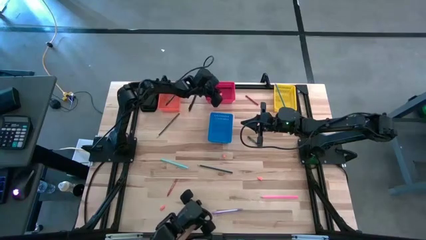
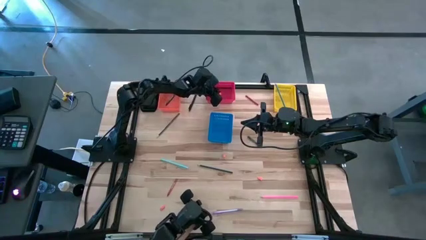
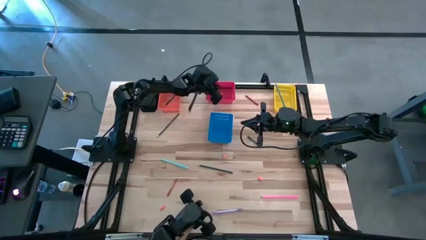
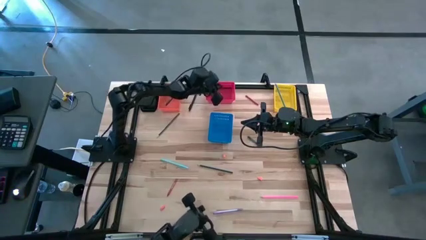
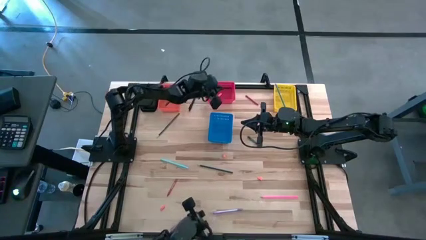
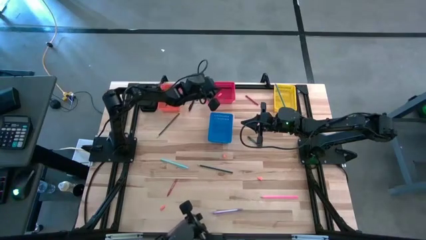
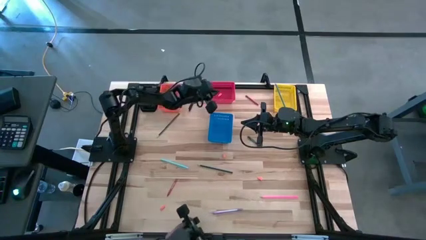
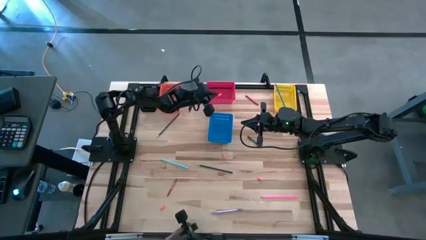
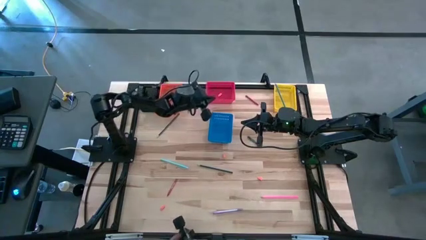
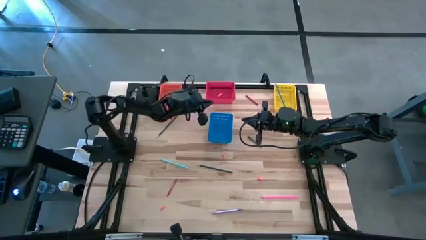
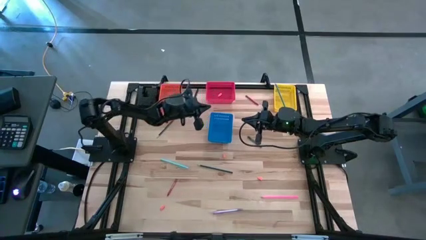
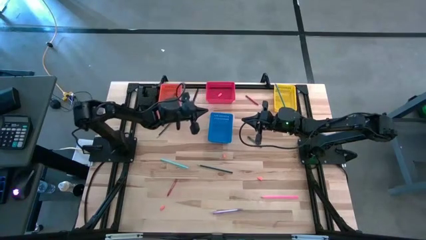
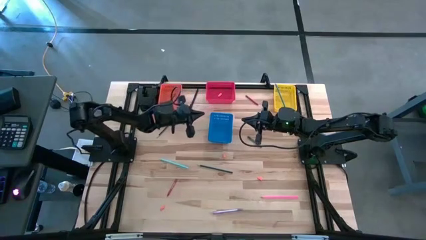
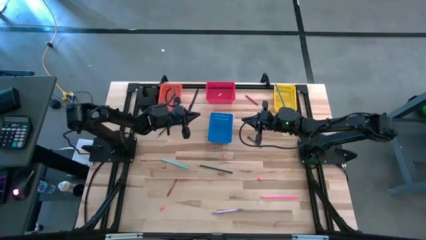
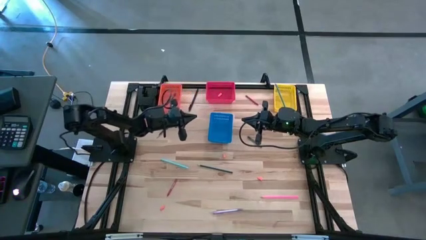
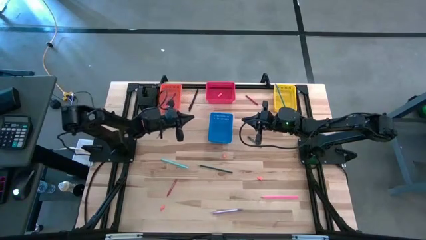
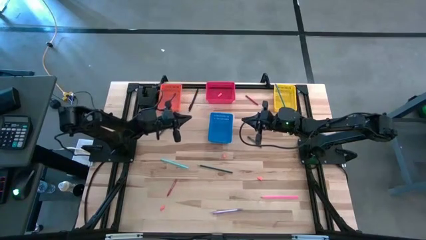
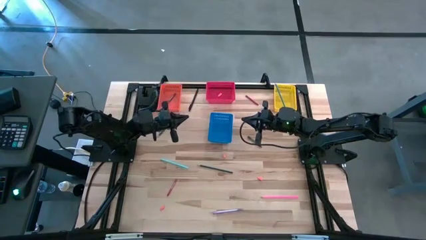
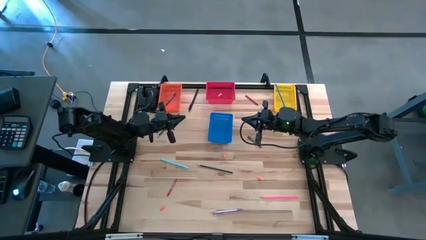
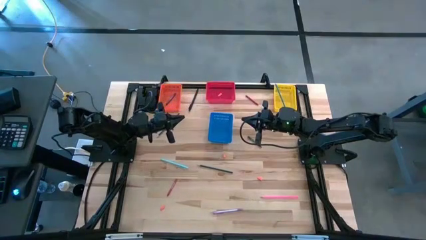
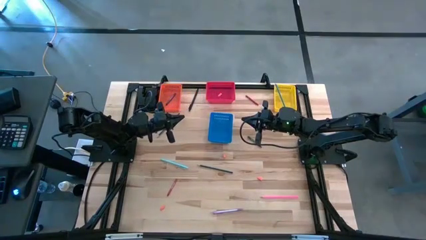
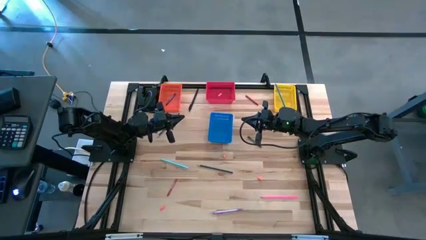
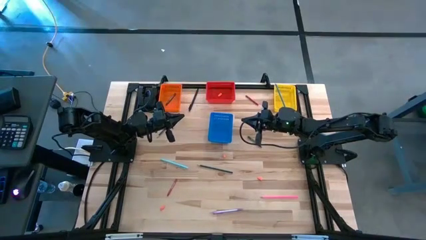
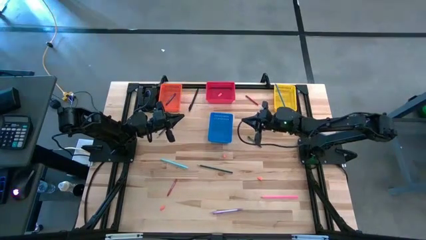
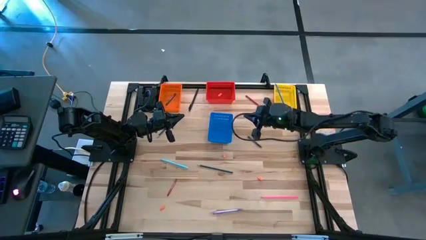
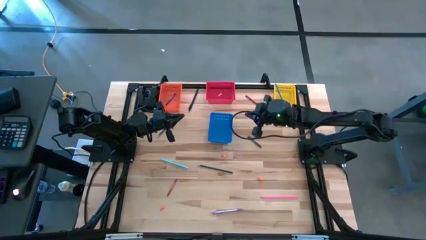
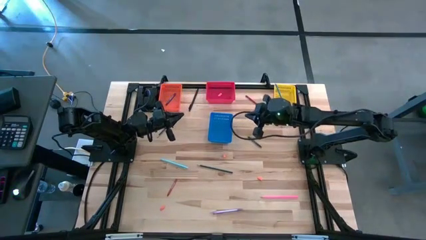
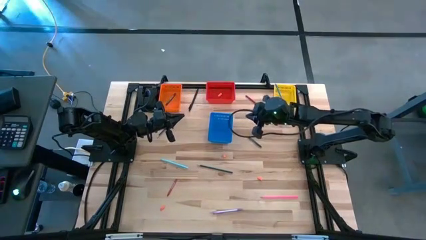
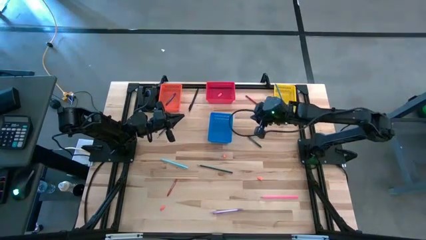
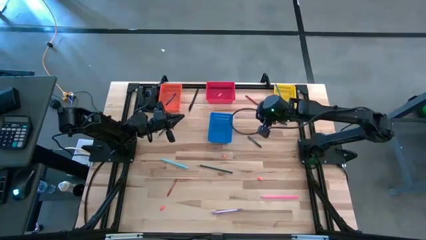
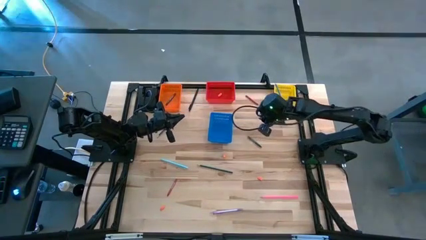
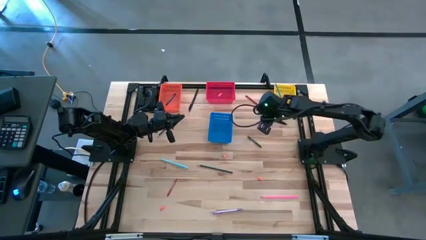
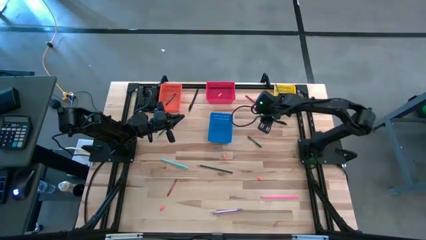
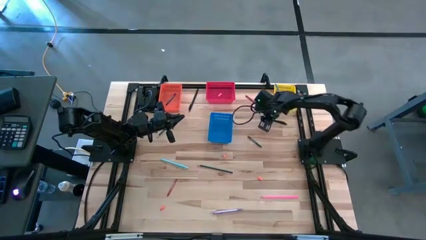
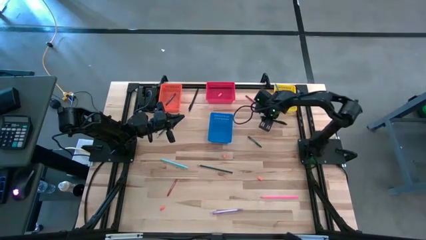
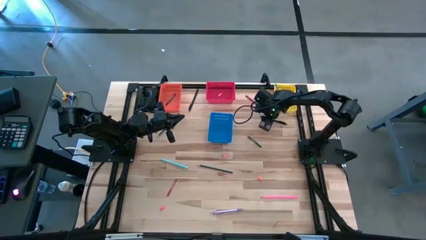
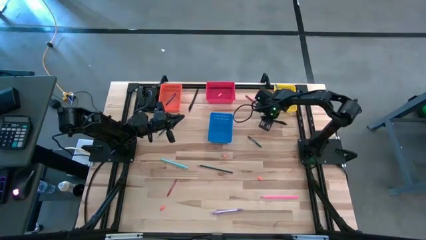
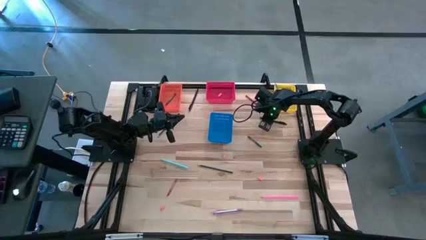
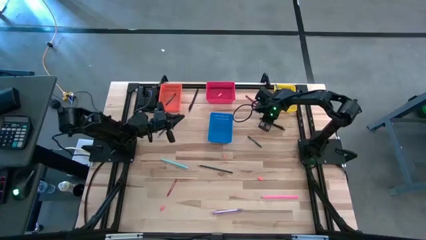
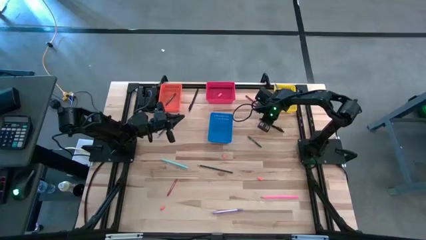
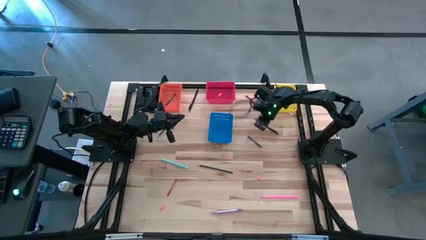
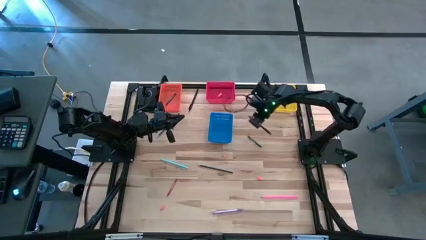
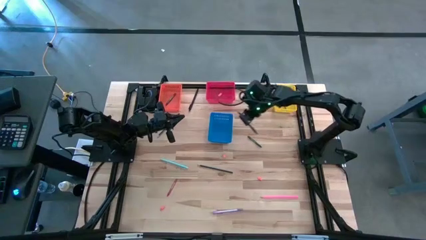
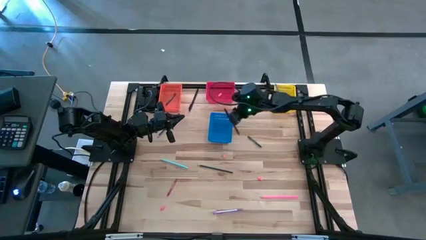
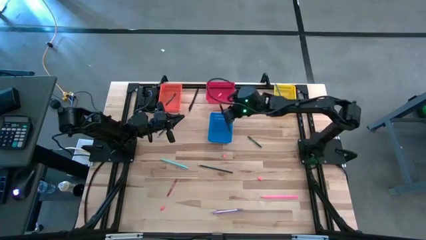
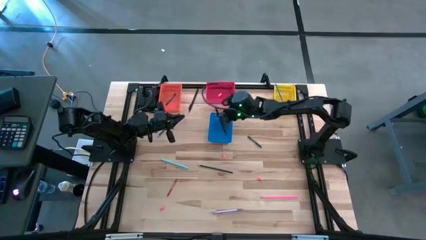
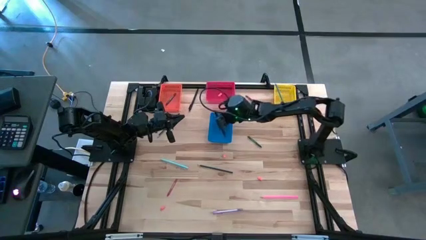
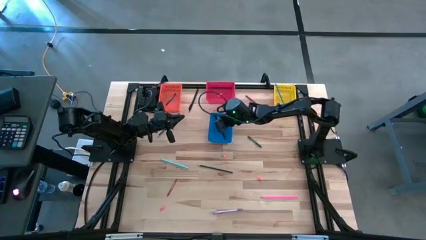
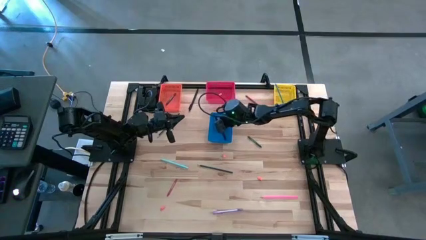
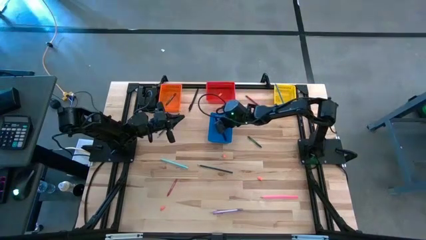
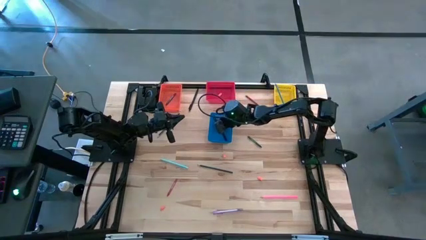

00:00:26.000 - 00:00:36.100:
Task: Sort crayons/erasers/pens/pencils in bins
Put the black pen into the blue bin

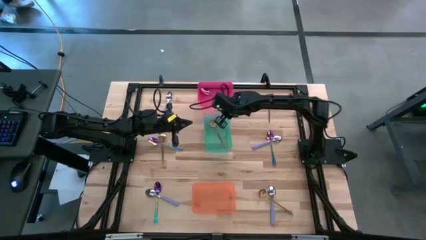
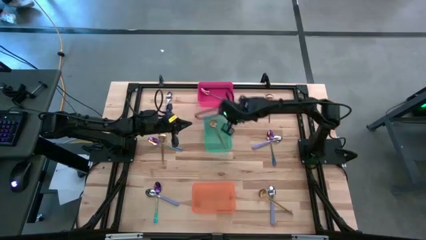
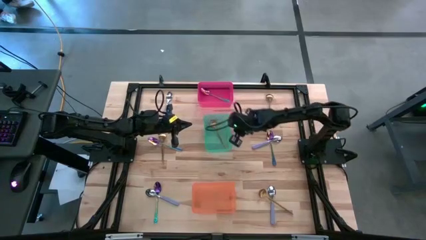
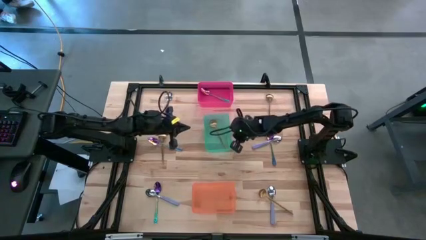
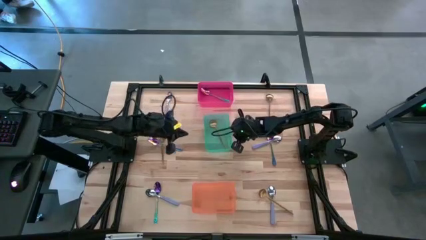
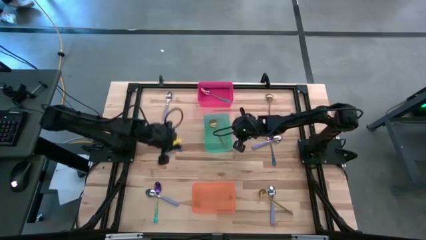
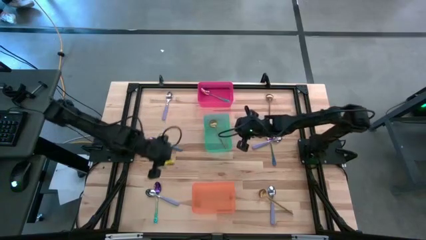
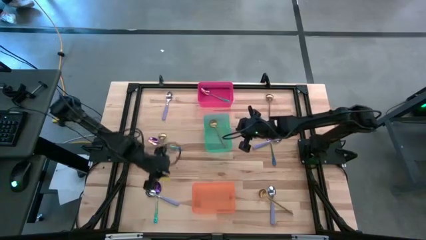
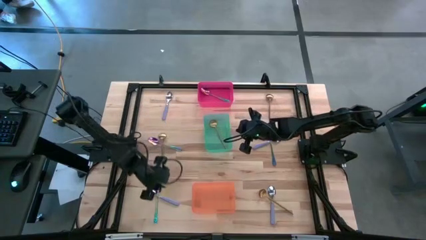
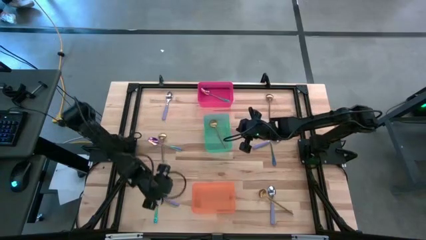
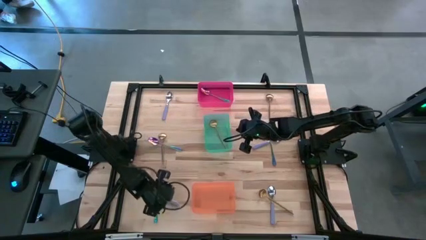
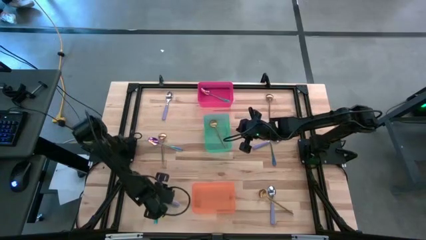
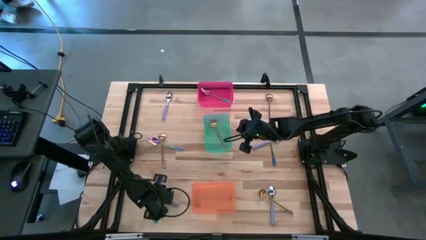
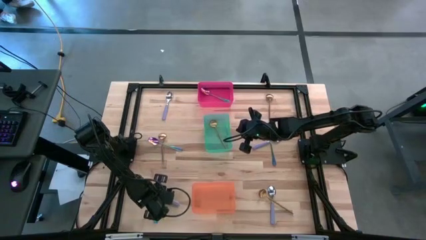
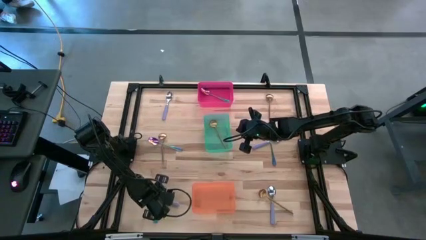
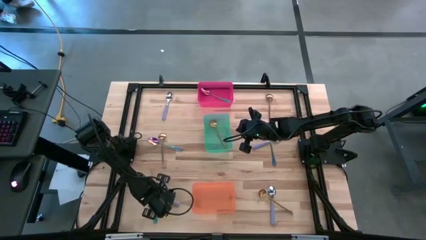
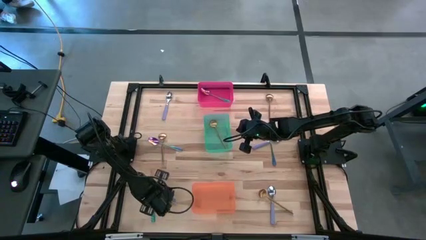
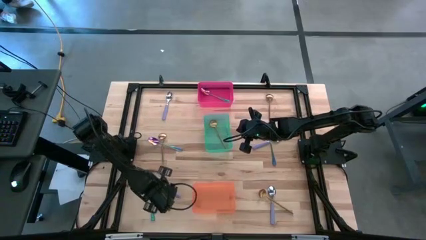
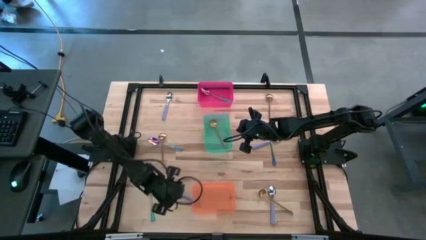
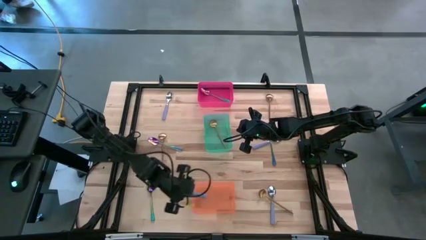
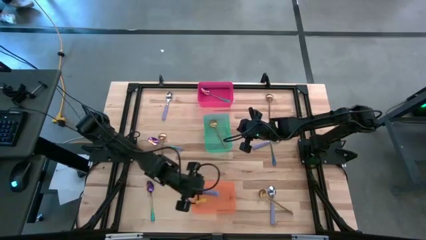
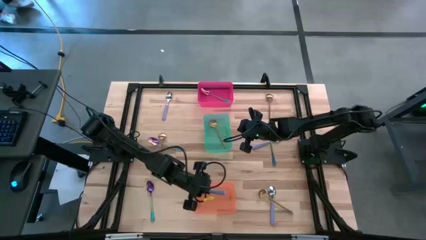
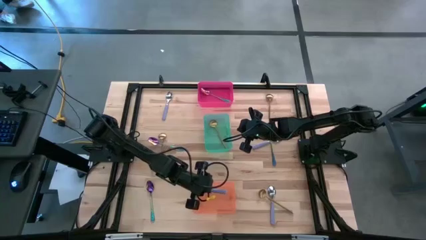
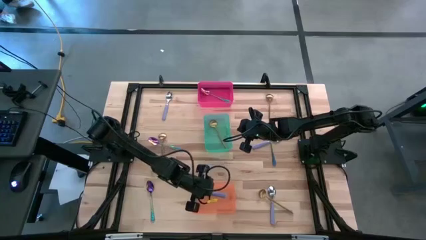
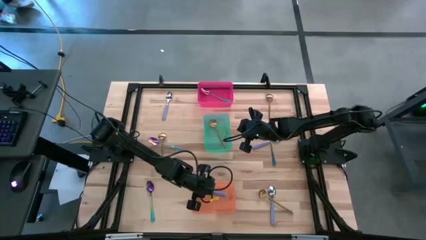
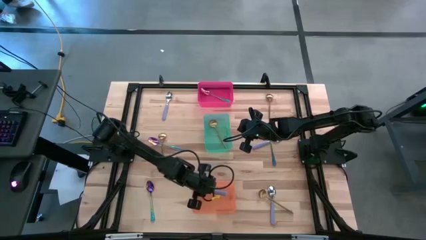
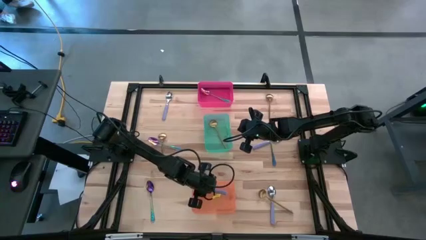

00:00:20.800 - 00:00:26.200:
Task: Sort silverware by color (type)
Put the purple spoon into the orange bin
